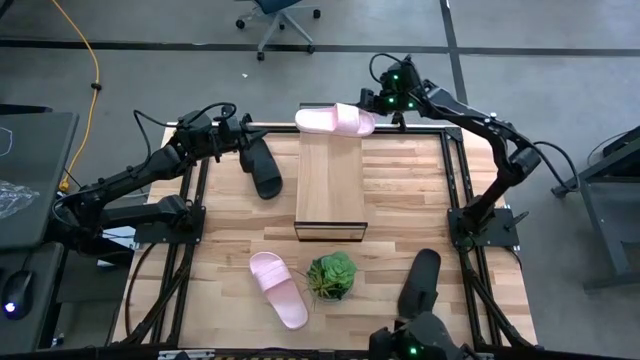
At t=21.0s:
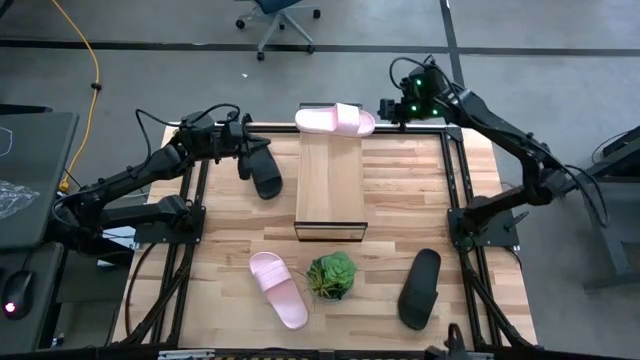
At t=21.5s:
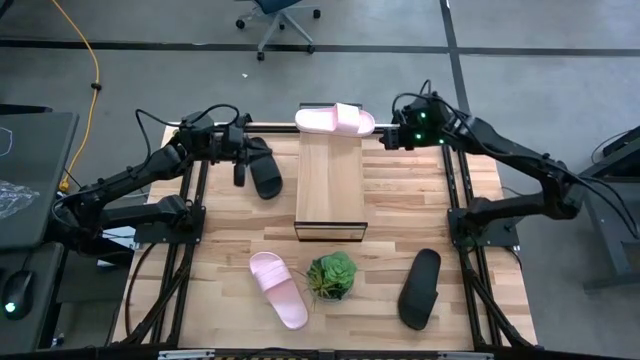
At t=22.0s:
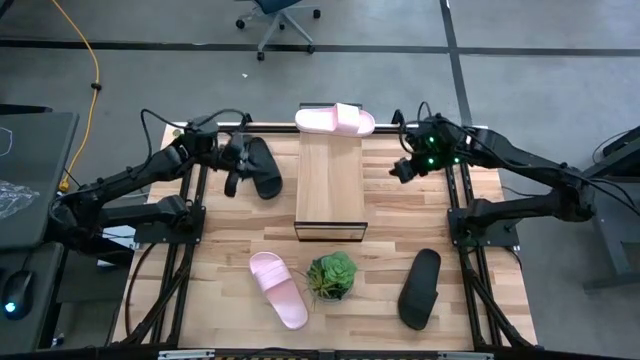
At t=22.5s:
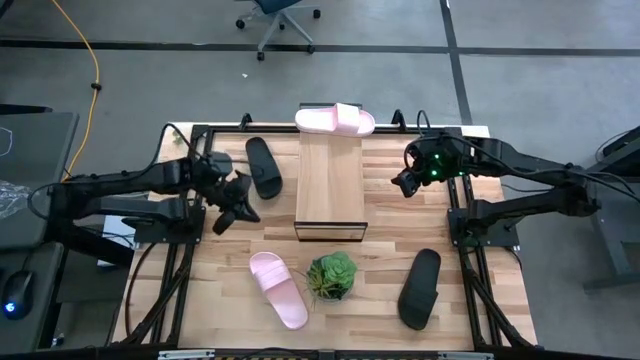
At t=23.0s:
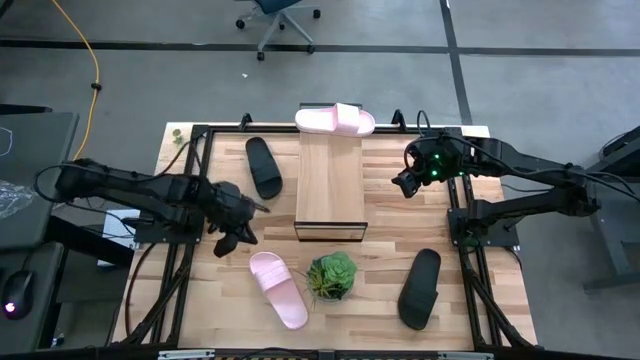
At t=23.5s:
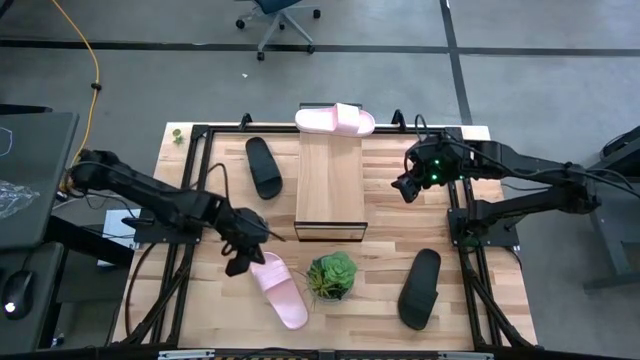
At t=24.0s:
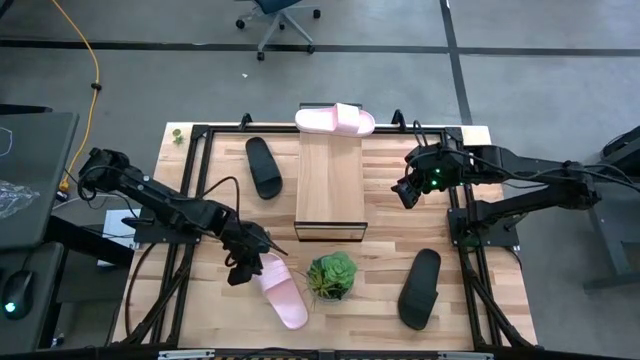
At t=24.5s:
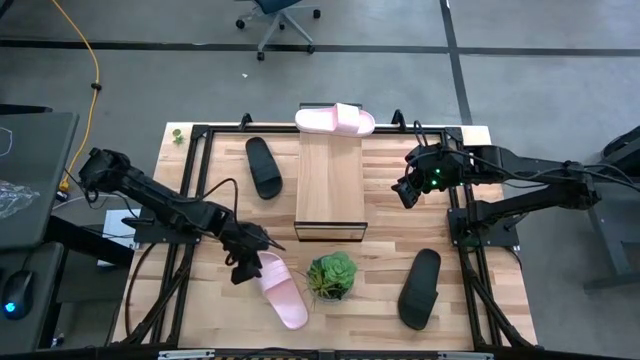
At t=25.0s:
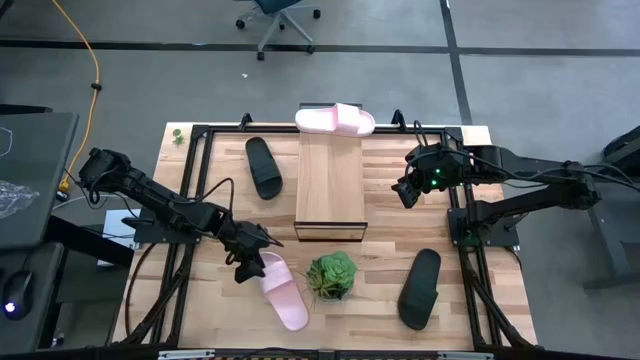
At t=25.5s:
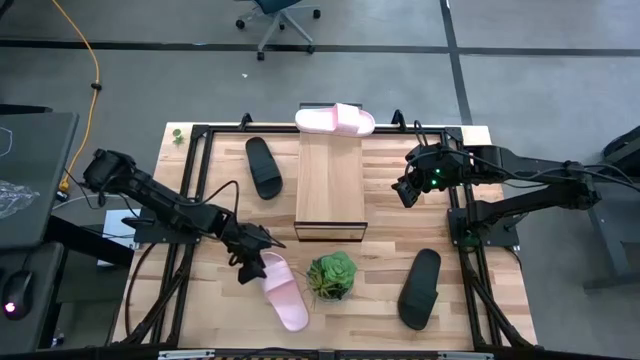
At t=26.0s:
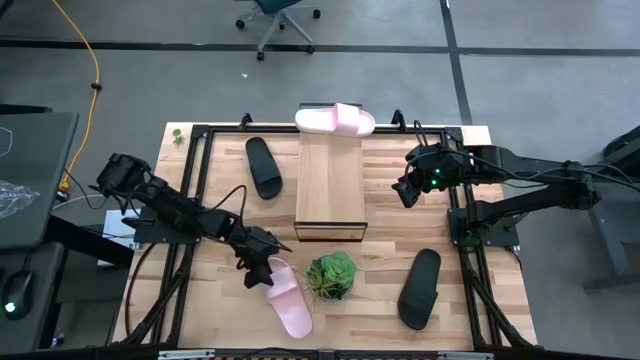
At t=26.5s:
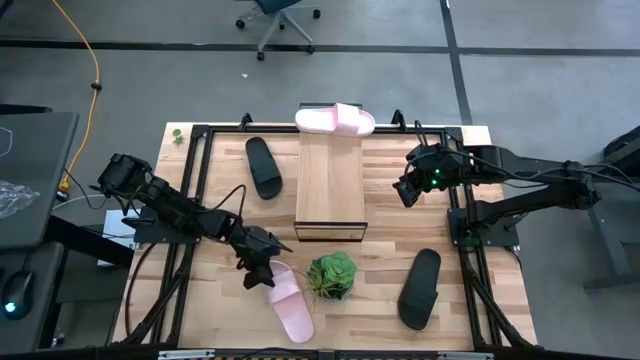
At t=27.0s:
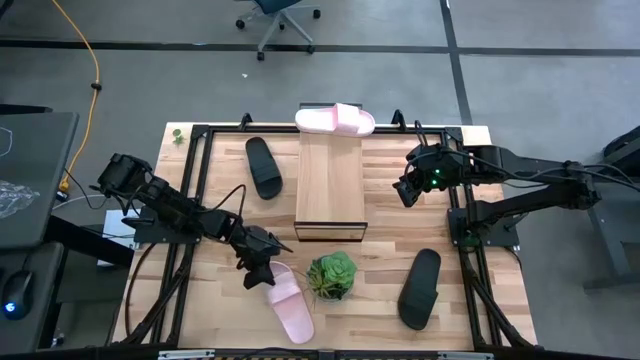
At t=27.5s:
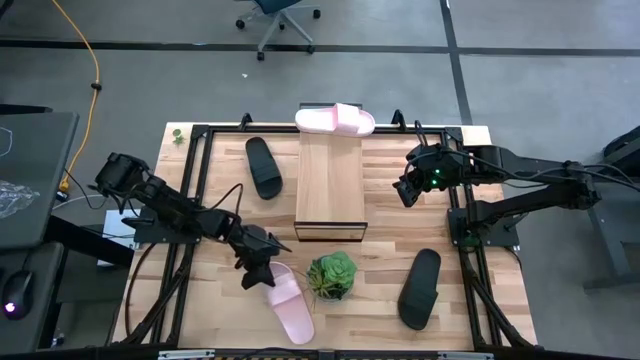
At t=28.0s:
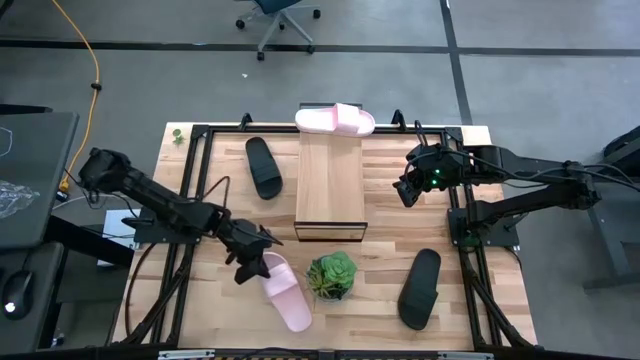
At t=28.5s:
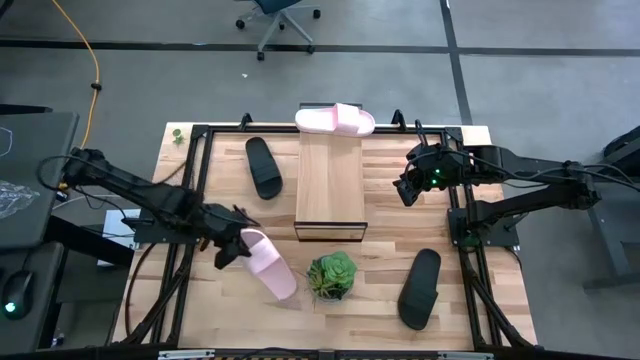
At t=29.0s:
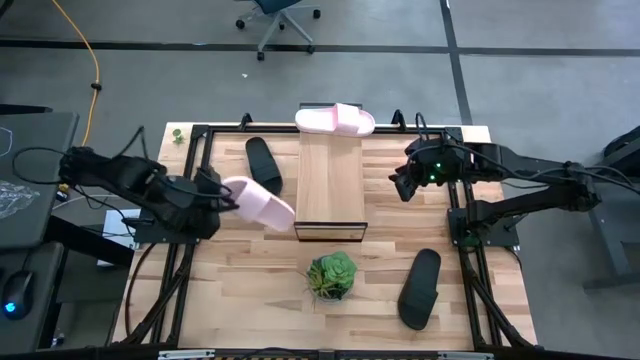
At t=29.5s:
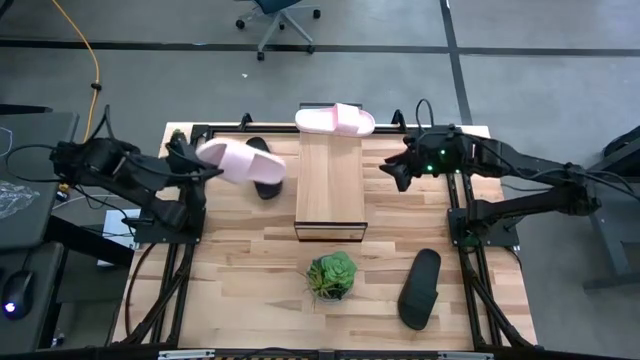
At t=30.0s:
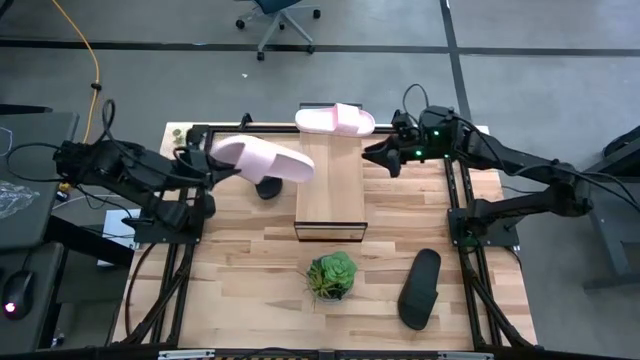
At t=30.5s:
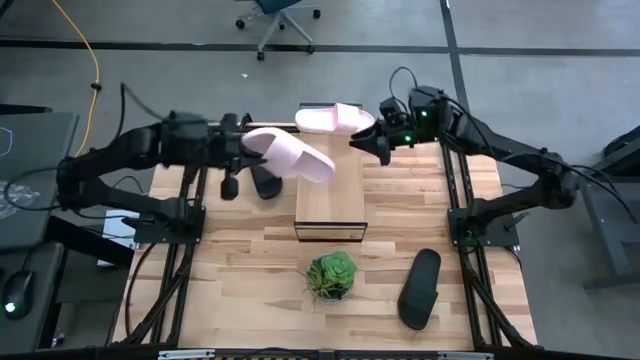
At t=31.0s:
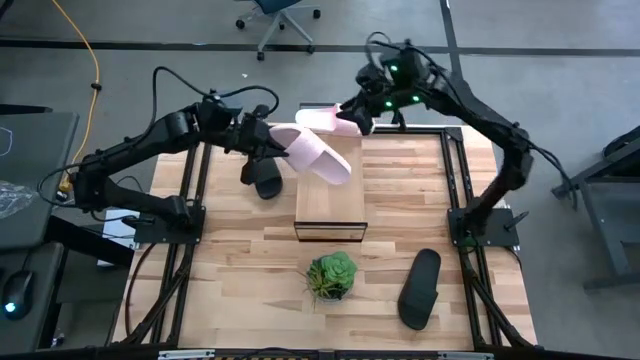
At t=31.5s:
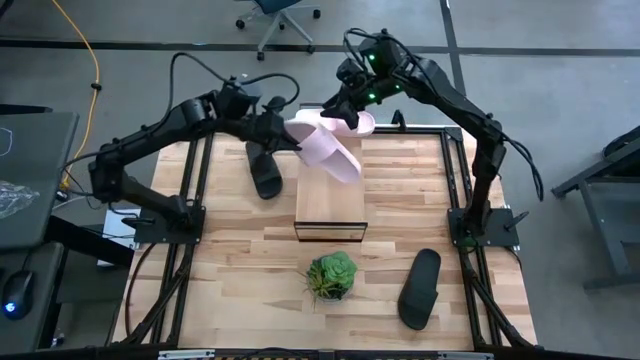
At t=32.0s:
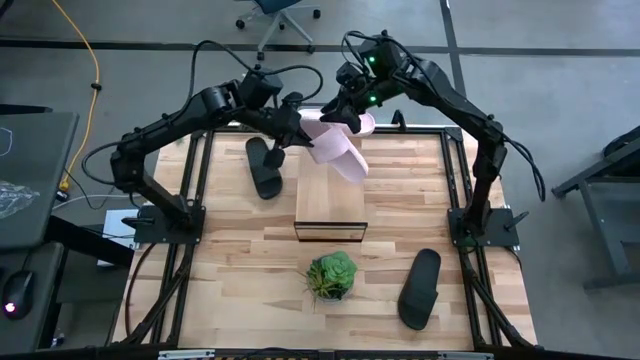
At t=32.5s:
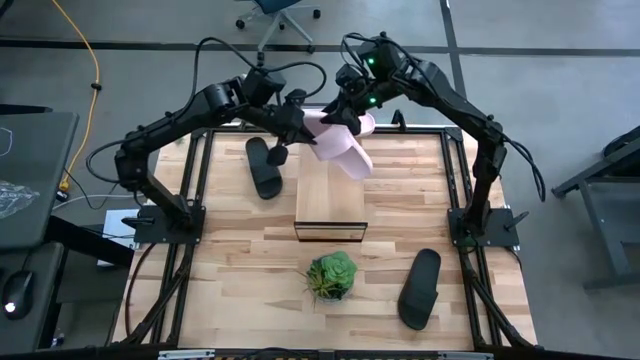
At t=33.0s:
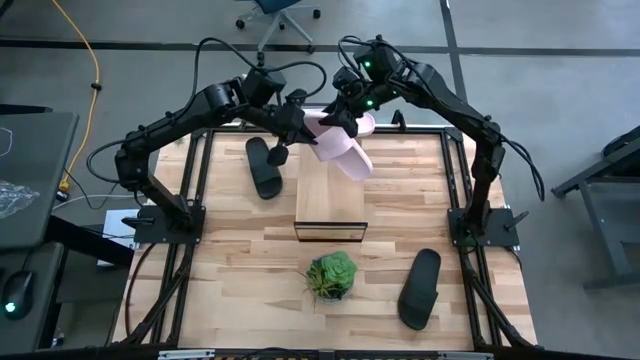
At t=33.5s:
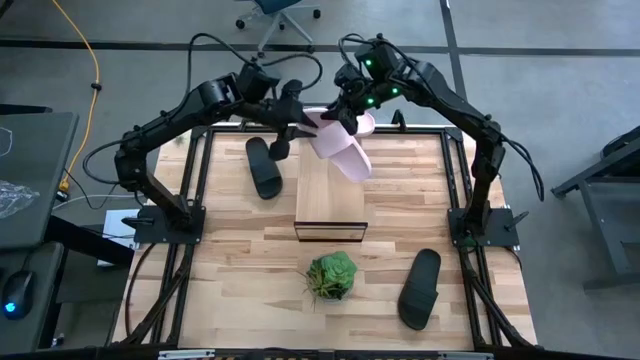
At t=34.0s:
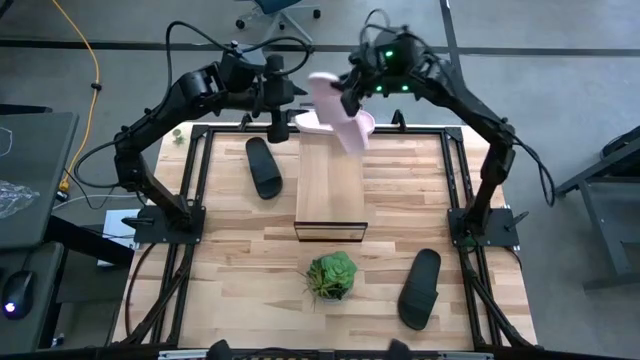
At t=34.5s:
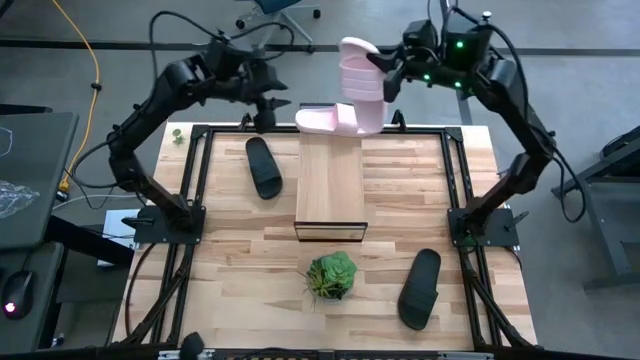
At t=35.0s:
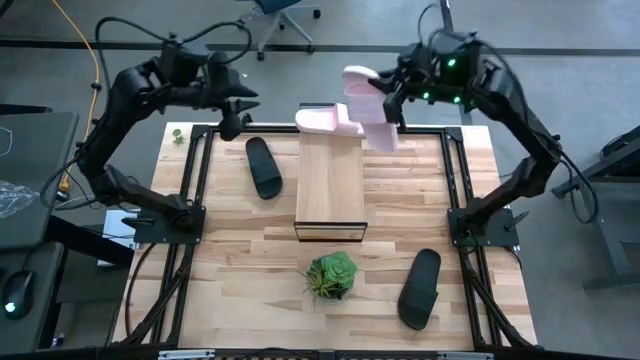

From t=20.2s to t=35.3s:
Task: Pick and place slides into the shelf
Put the pink slide on the shelf
